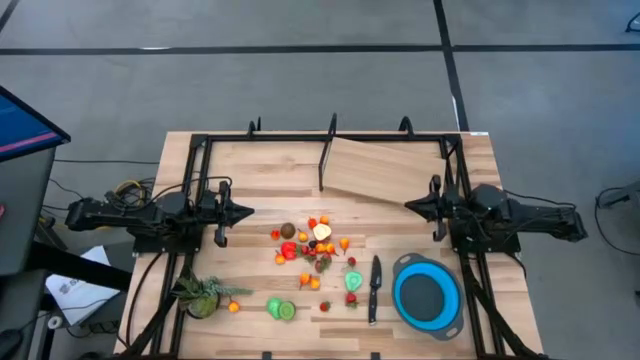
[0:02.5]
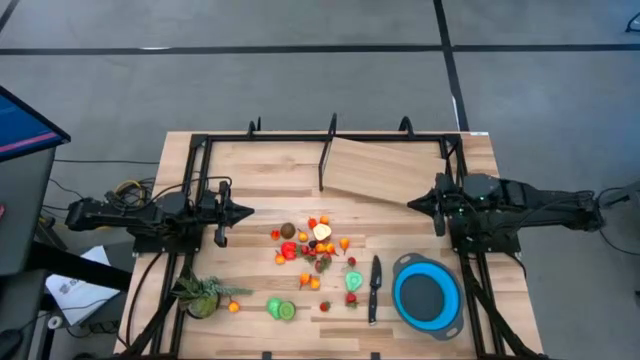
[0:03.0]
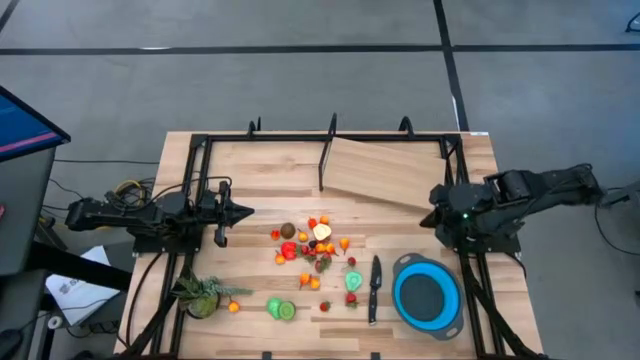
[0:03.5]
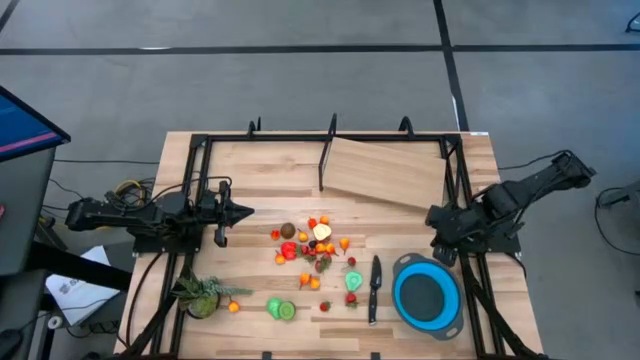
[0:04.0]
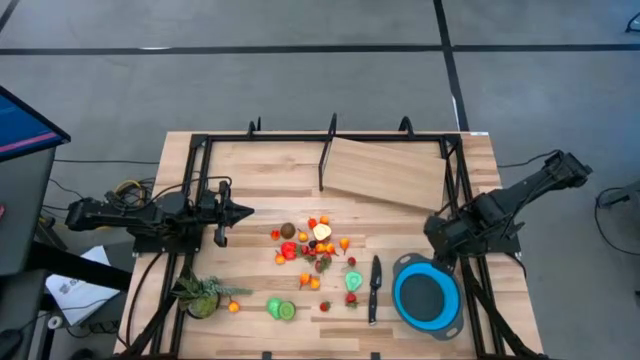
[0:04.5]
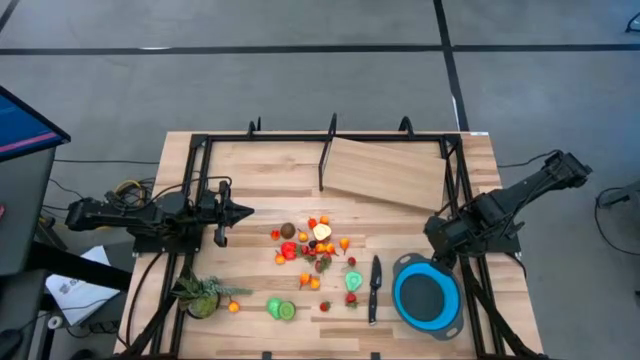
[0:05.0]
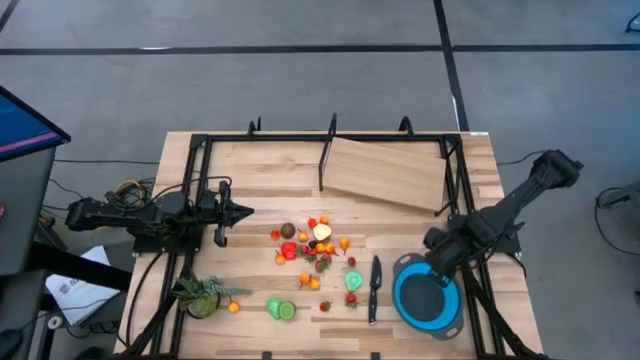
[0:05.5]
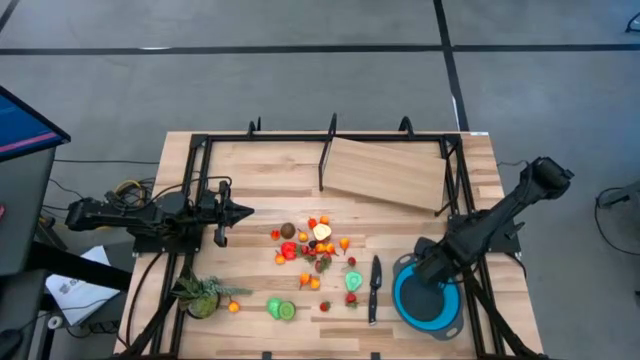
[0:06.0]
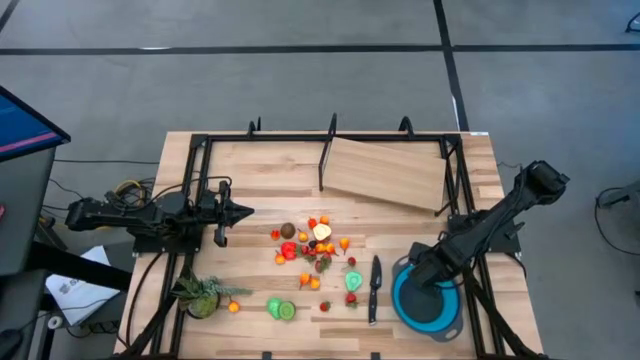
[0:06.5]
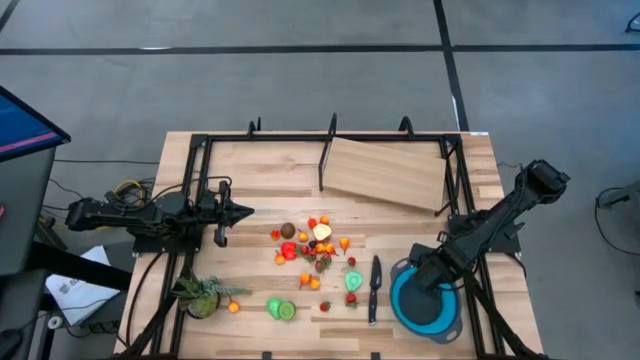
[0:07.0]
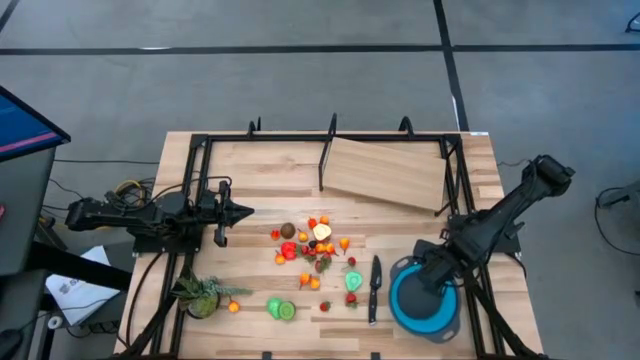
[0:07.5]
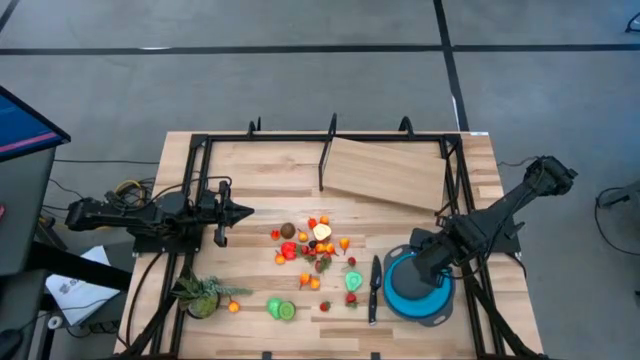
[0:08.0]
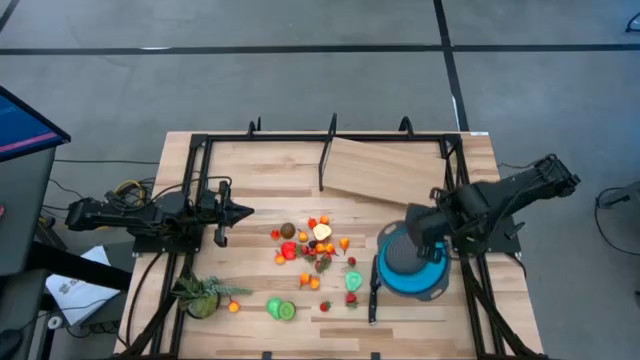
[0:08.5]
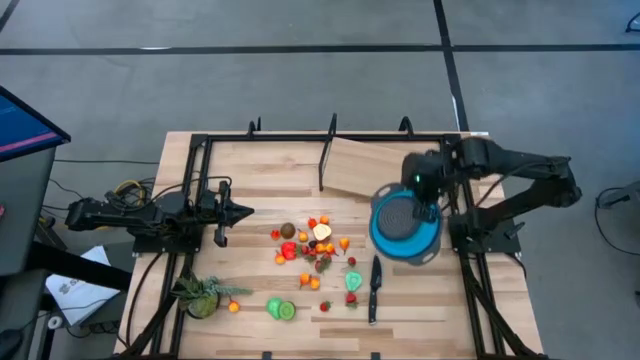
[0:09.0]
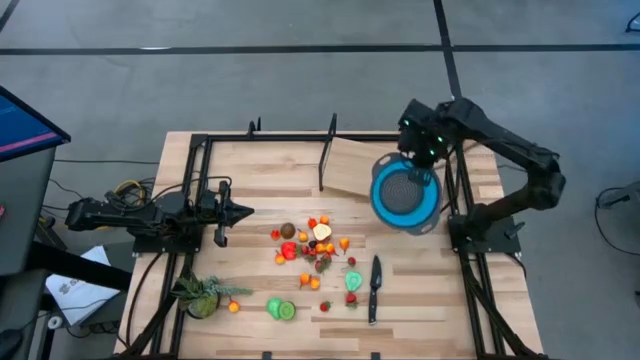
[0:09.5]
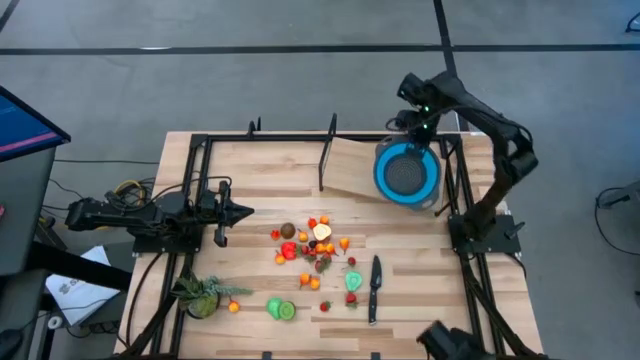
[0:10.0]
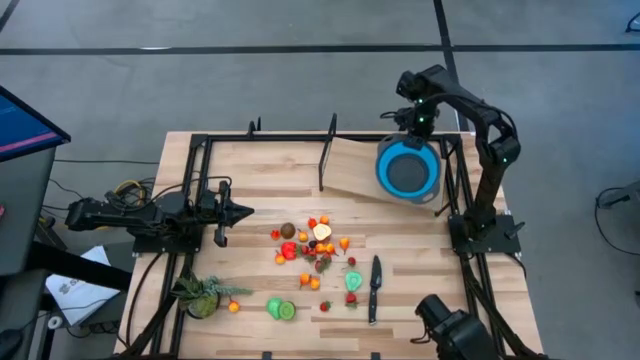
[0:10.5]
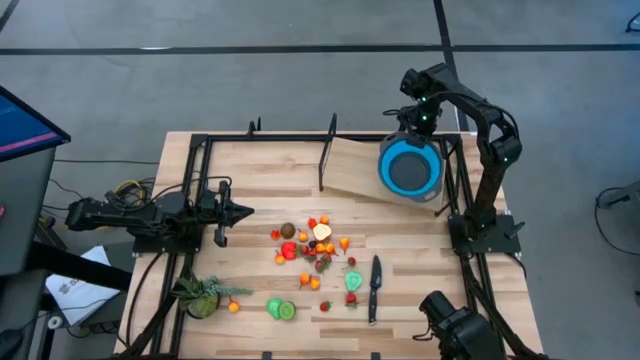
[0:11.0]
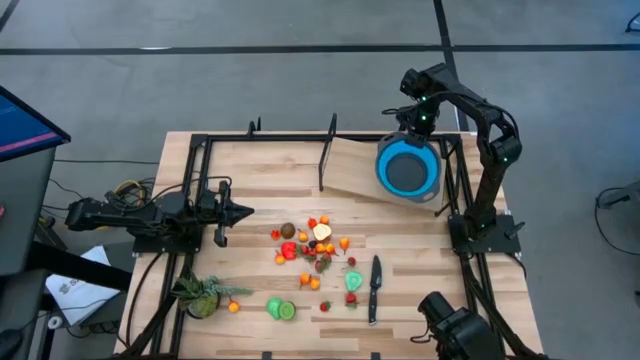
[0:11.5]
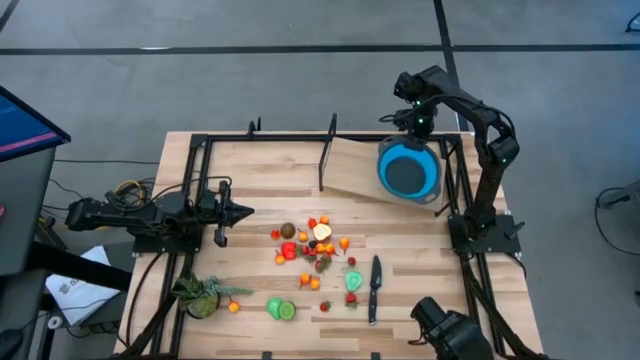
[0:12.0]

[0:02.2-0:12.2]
Task: Pick & Place Fruit
Put the blue colander on the shelf

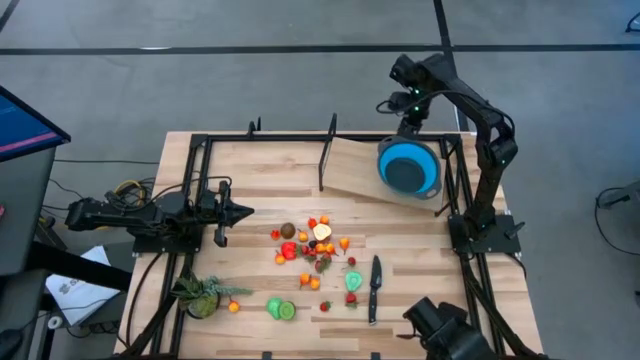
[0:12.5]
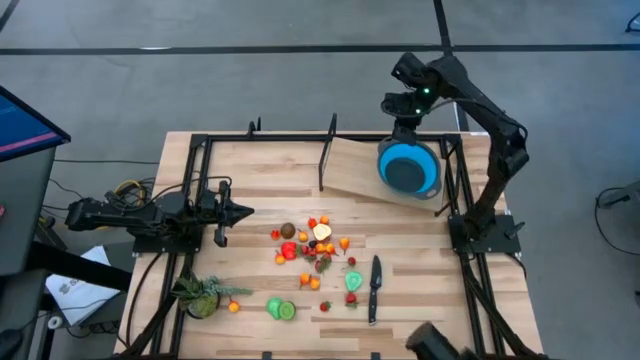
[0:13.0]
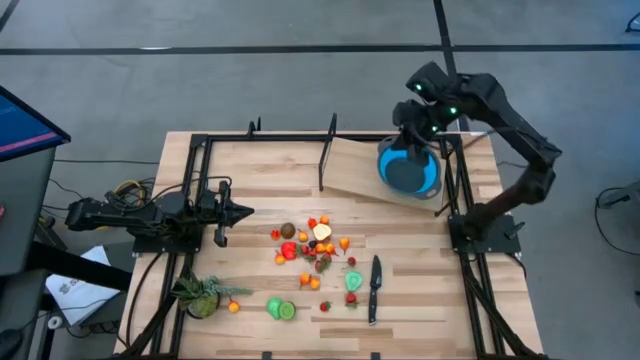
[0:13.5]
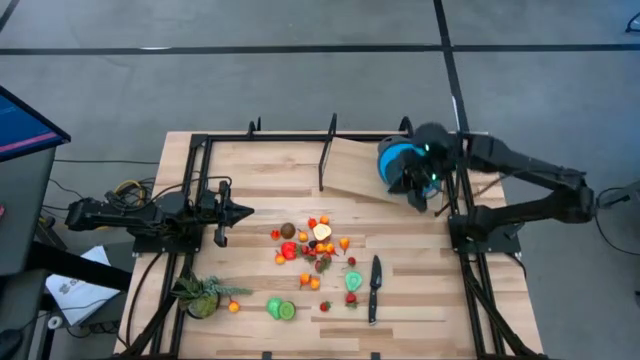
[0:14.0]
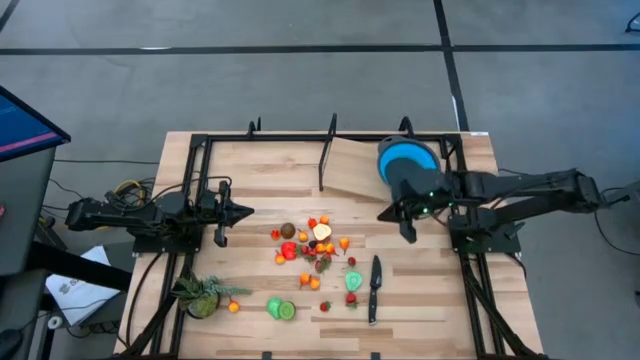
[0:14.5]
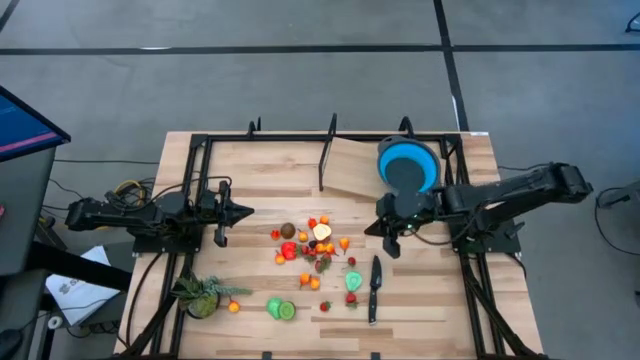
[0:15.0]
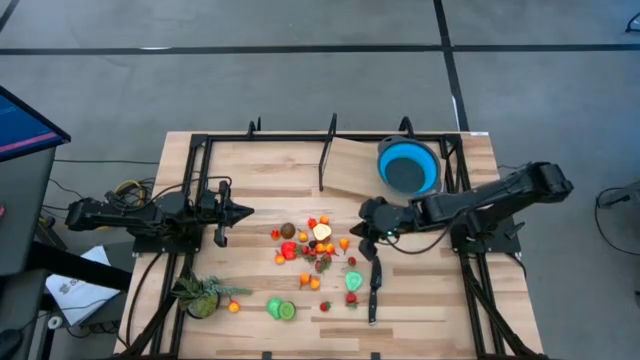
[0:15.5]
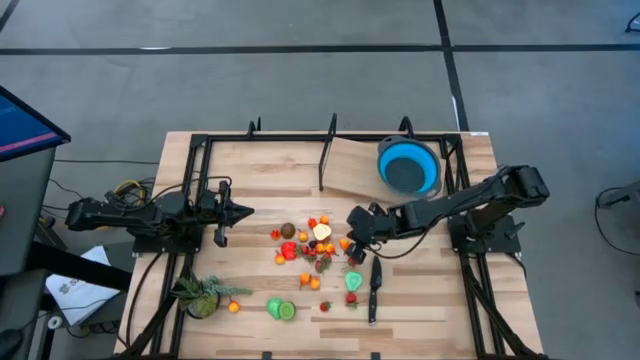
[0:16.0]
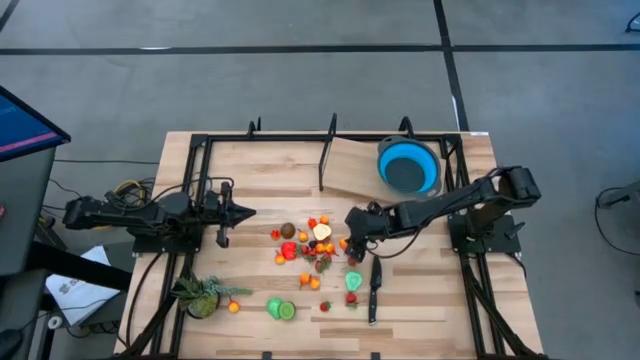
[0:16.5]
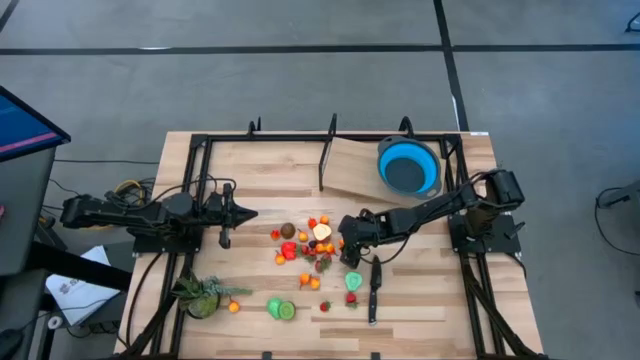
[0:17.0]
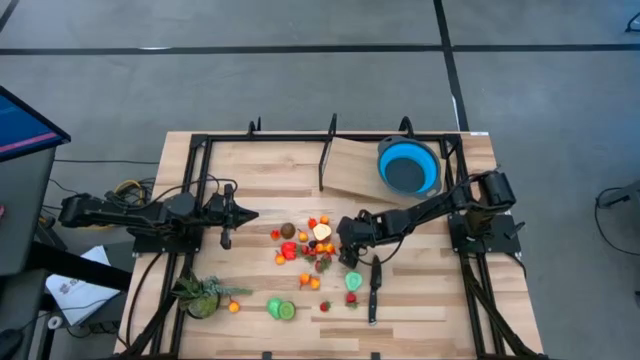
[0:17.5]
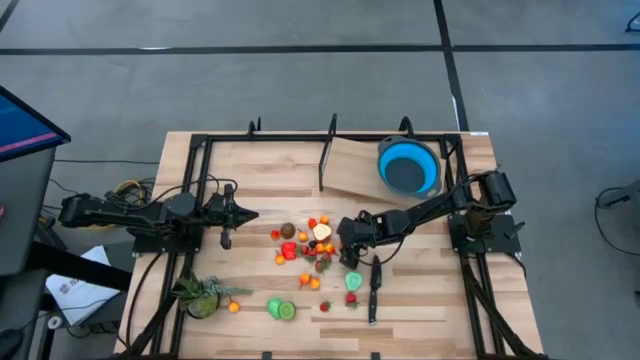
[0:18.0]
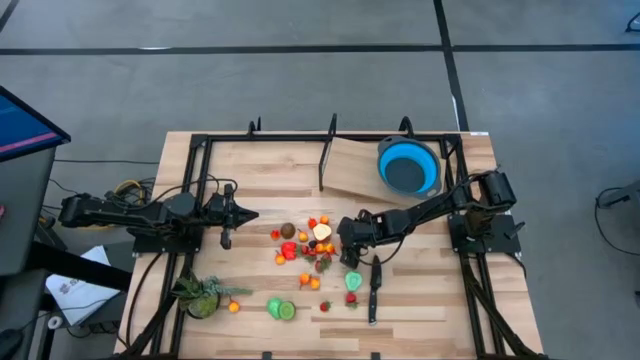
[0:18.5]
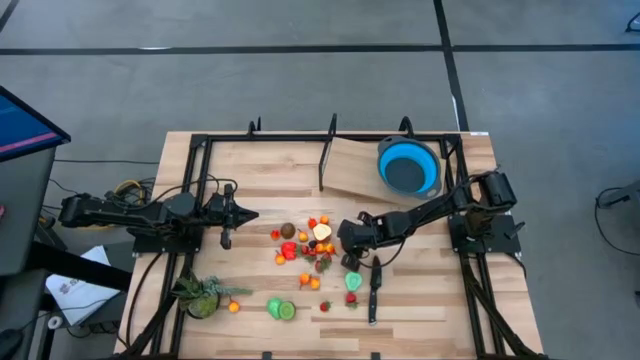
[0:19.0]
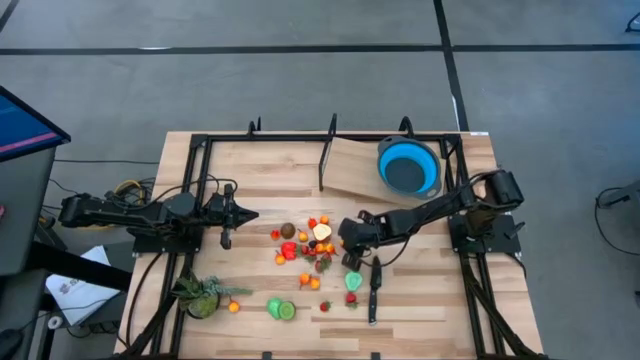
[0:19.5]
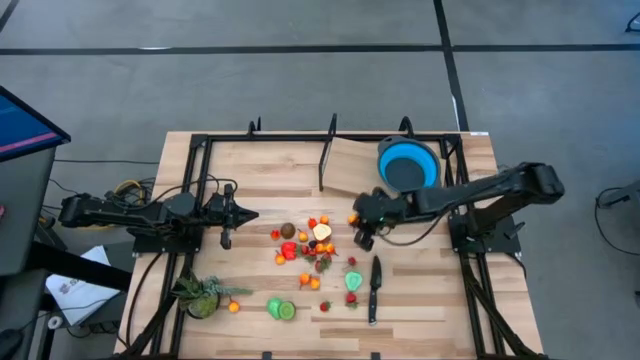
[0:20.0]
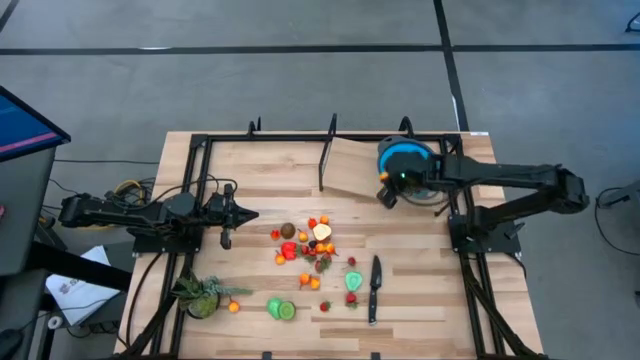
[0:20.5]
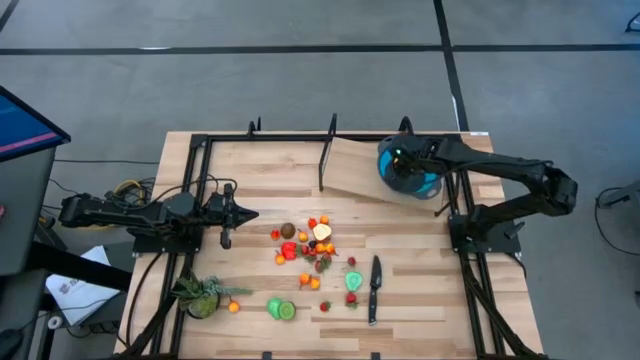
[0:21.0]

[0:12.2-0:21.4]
Put the orange pear into the blue colander

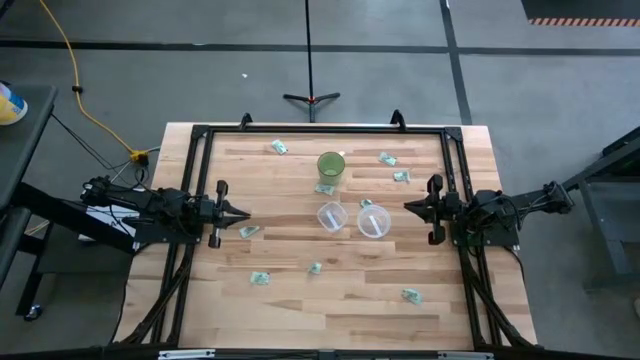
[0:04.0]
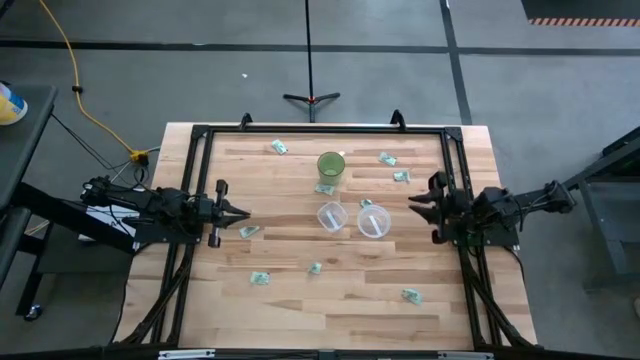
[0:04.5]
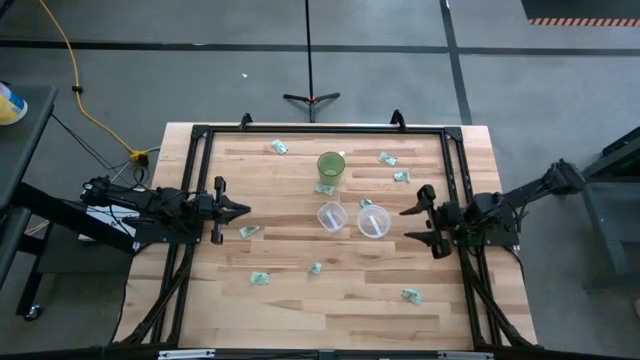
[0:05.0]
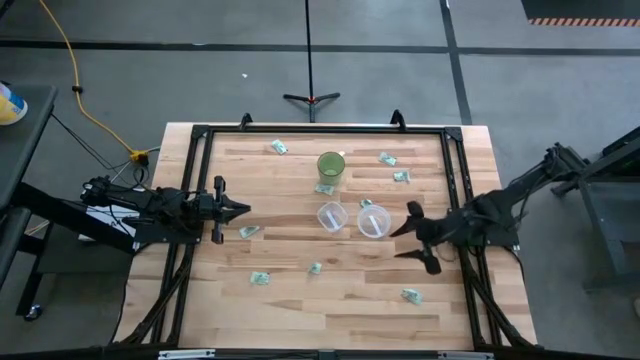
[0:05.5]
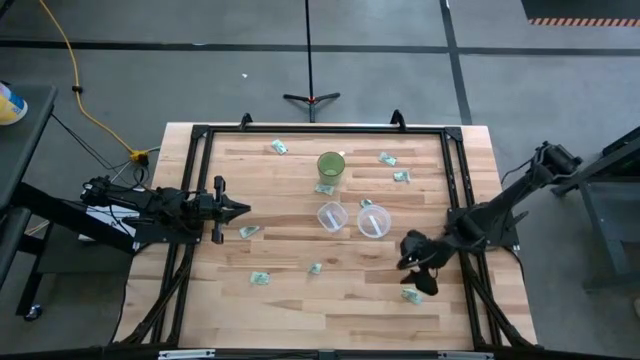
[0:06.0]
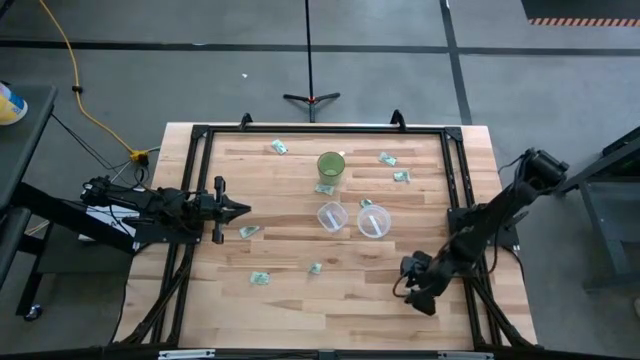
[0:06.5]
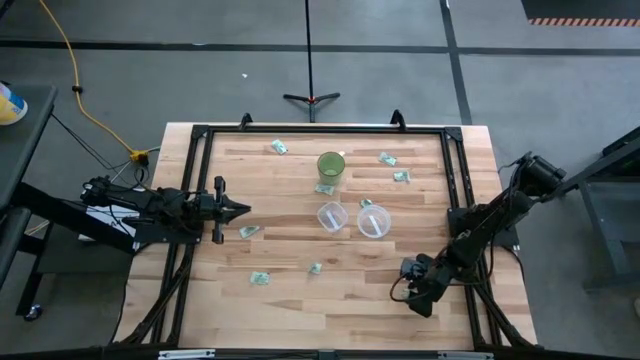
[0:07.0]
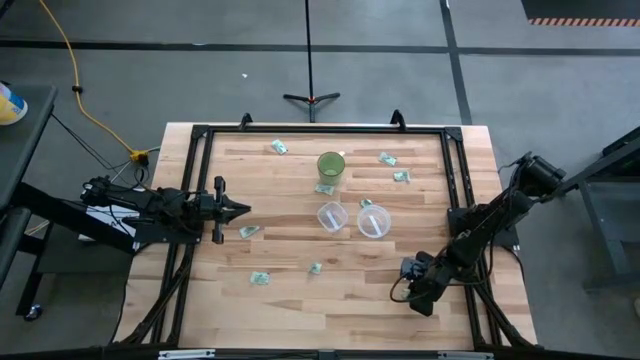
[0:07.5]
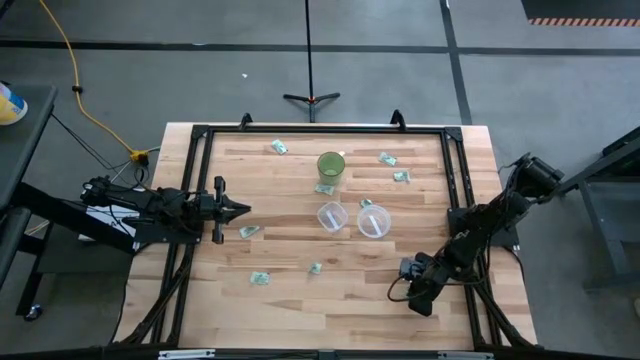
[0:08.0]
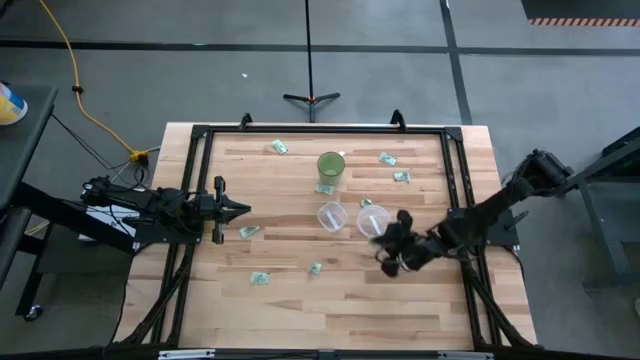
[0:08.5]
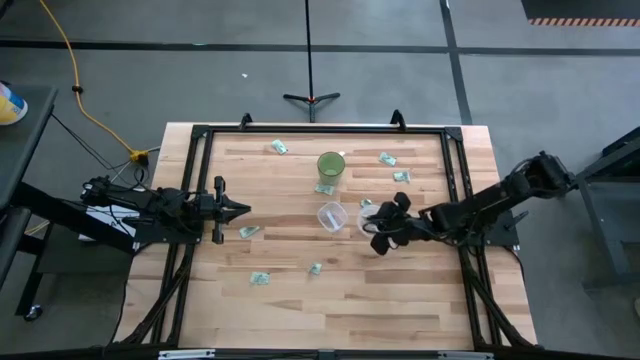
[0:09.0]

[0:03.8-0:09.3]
Task: Pick and place items into bin
Put the stevia packet into the right transparent bin
